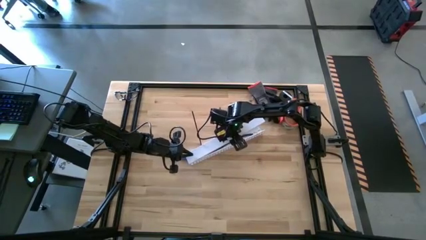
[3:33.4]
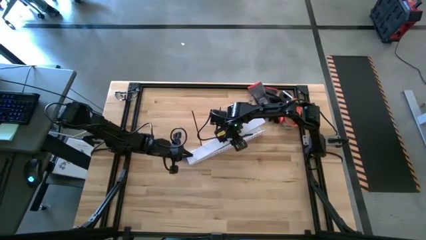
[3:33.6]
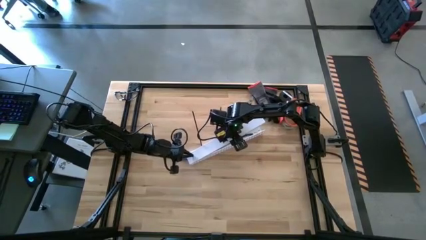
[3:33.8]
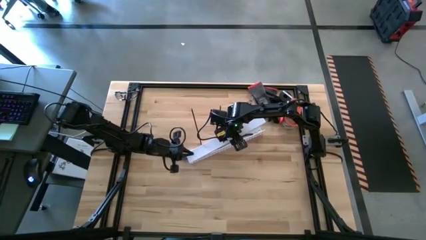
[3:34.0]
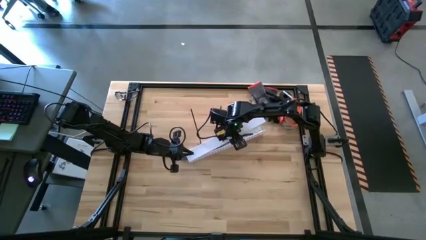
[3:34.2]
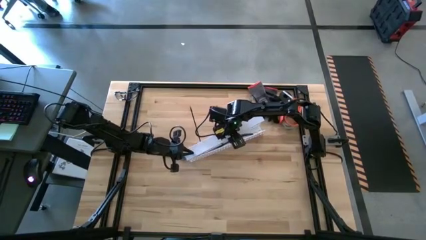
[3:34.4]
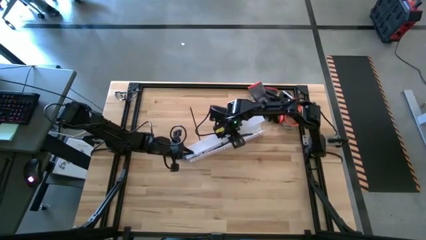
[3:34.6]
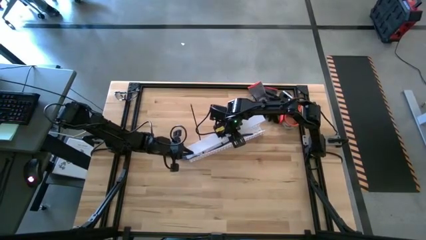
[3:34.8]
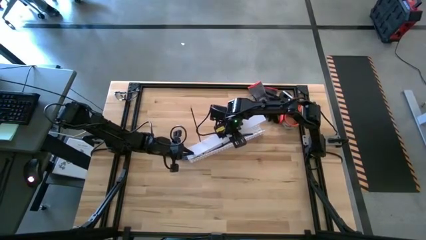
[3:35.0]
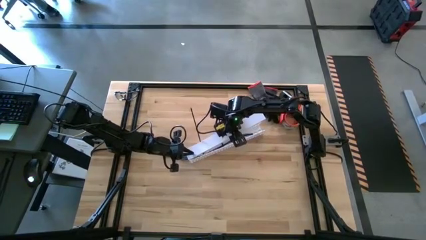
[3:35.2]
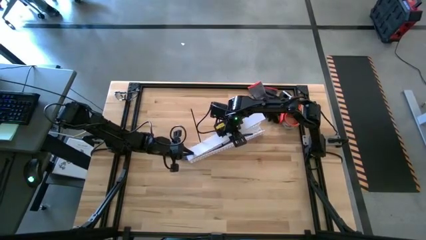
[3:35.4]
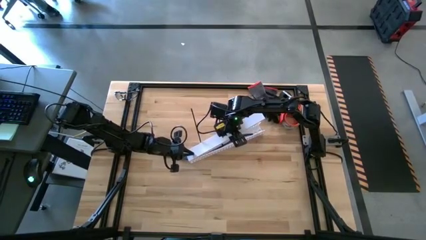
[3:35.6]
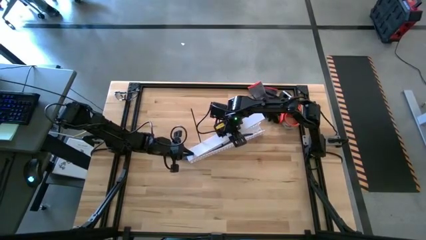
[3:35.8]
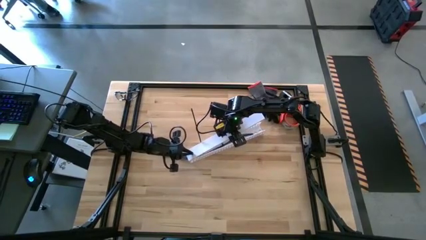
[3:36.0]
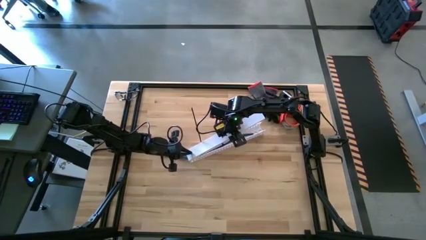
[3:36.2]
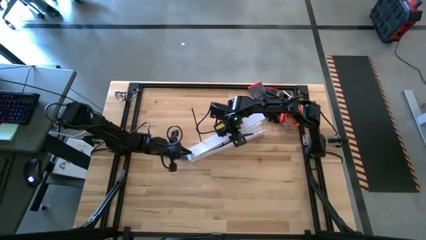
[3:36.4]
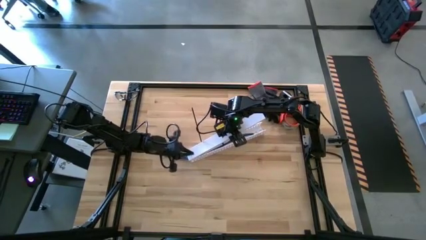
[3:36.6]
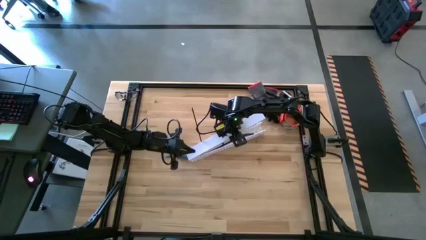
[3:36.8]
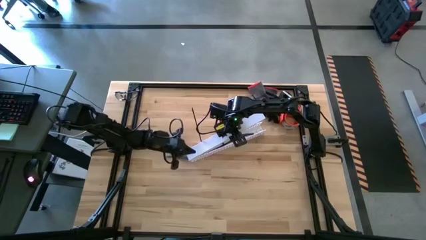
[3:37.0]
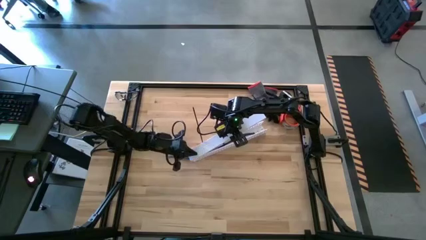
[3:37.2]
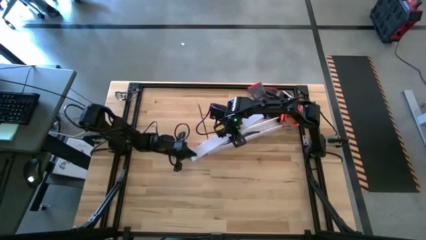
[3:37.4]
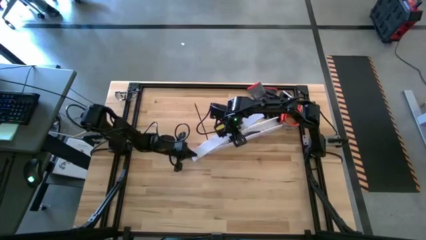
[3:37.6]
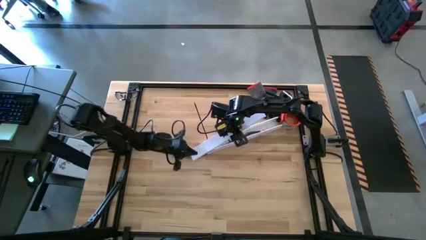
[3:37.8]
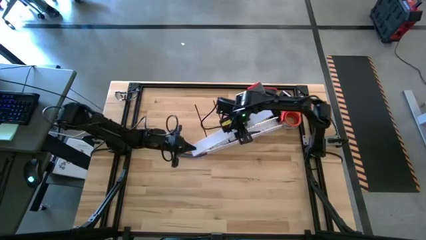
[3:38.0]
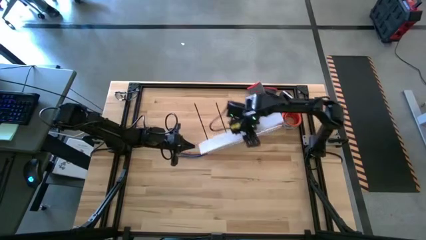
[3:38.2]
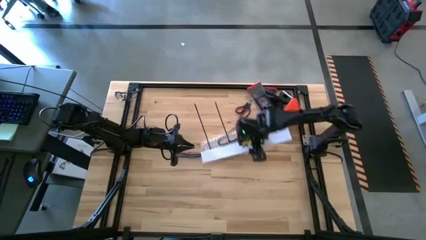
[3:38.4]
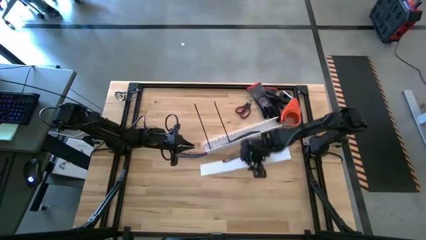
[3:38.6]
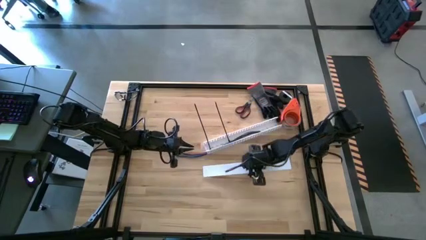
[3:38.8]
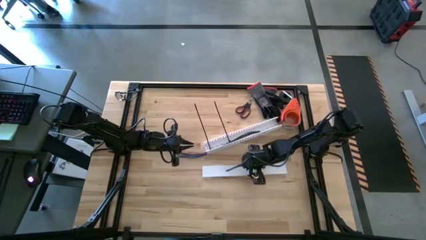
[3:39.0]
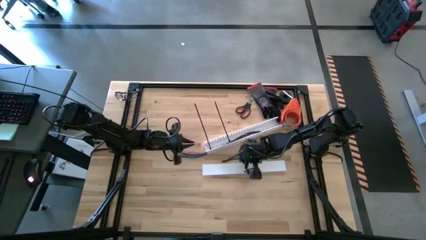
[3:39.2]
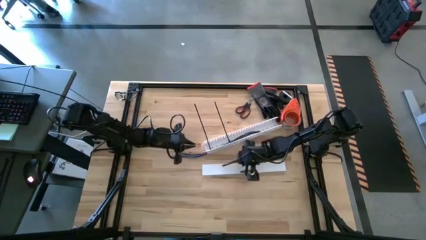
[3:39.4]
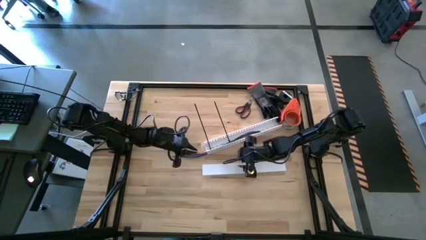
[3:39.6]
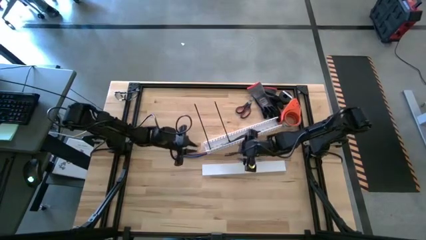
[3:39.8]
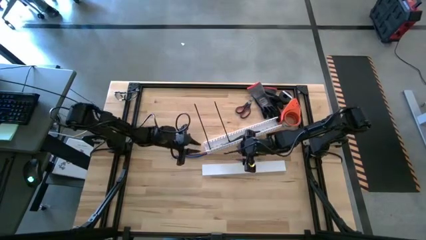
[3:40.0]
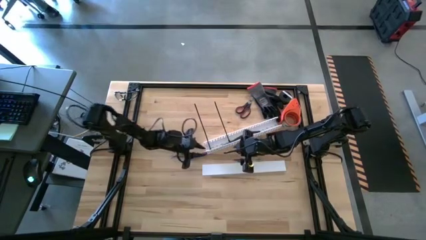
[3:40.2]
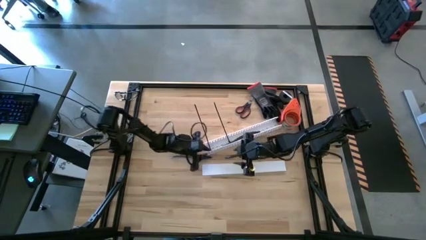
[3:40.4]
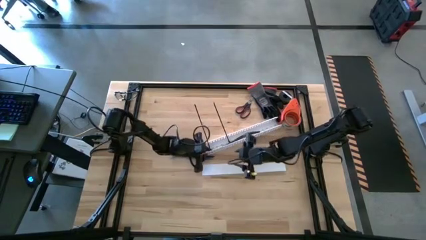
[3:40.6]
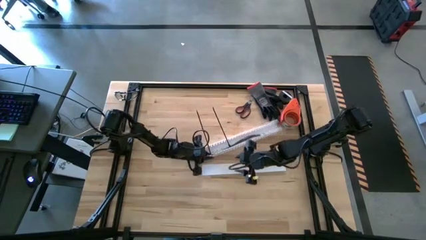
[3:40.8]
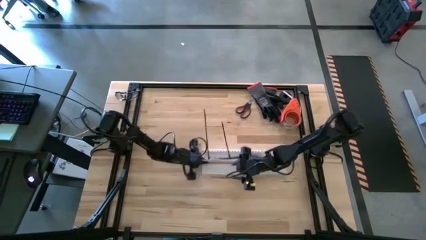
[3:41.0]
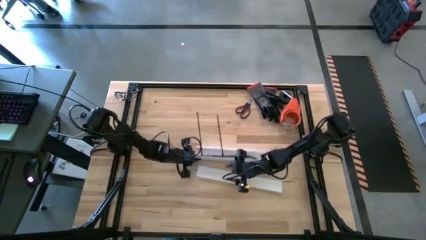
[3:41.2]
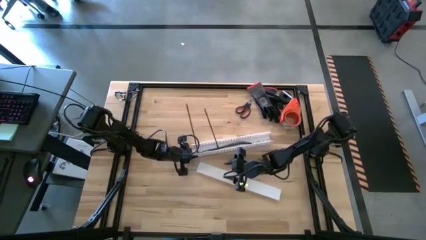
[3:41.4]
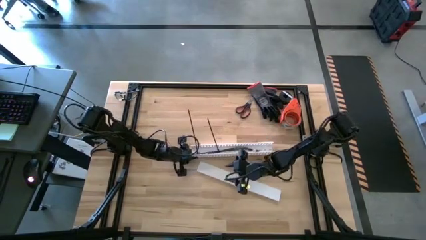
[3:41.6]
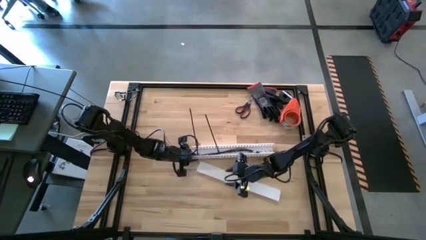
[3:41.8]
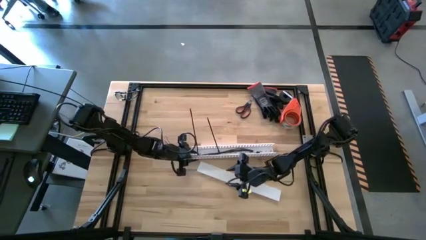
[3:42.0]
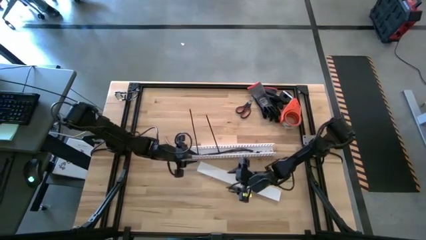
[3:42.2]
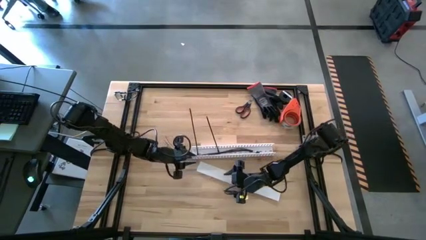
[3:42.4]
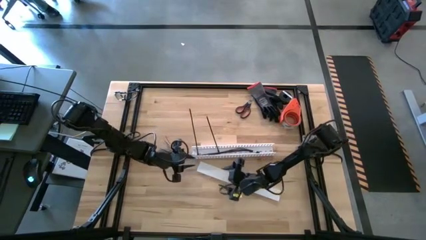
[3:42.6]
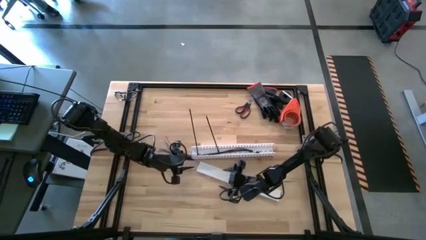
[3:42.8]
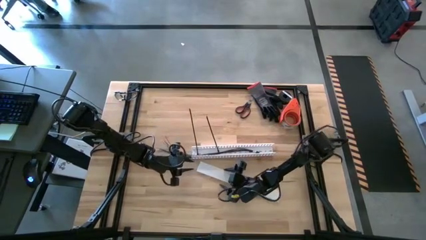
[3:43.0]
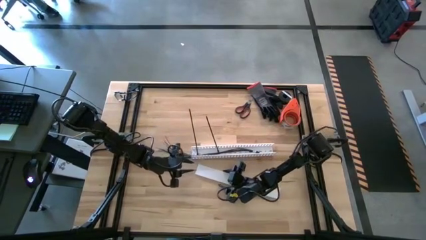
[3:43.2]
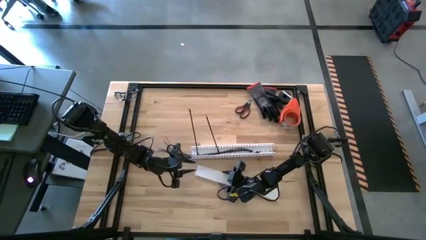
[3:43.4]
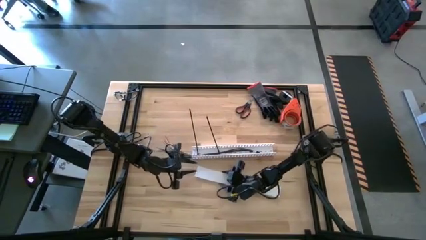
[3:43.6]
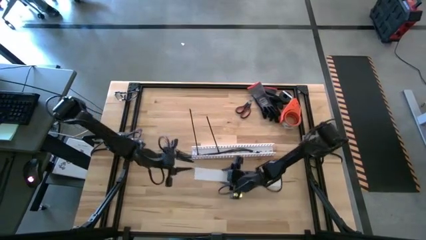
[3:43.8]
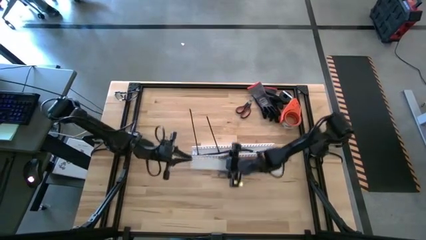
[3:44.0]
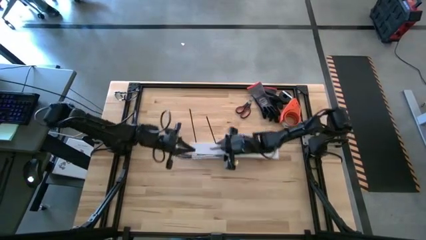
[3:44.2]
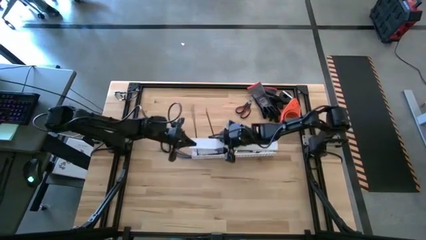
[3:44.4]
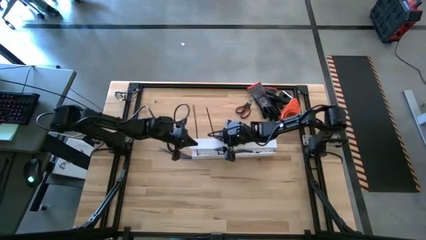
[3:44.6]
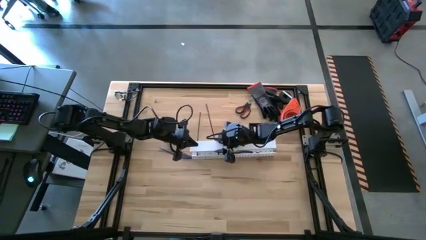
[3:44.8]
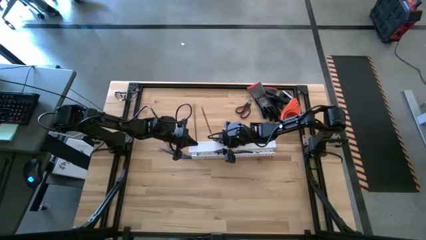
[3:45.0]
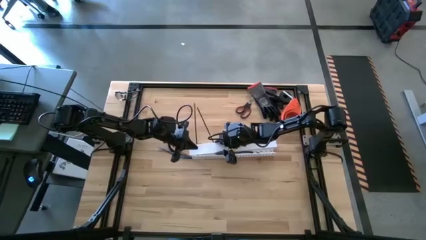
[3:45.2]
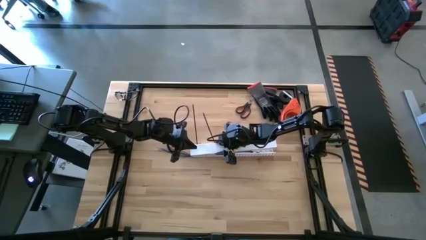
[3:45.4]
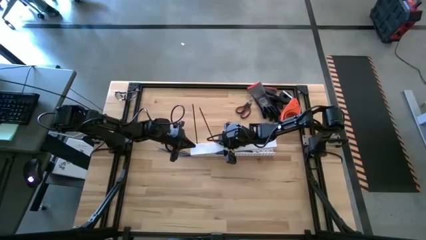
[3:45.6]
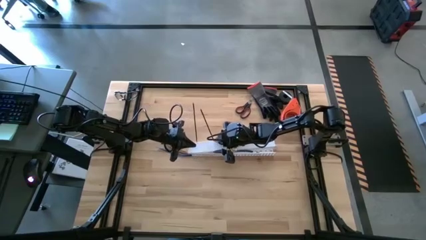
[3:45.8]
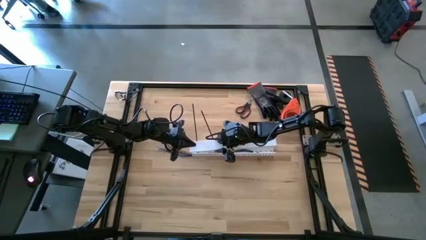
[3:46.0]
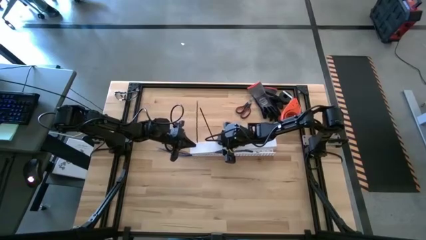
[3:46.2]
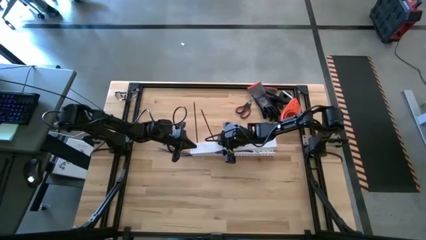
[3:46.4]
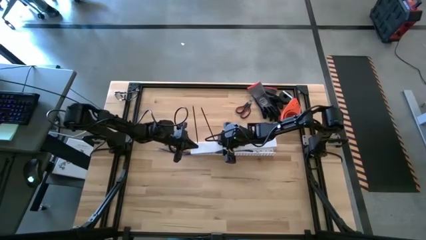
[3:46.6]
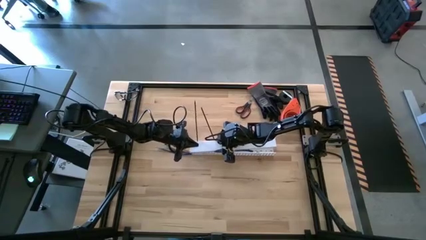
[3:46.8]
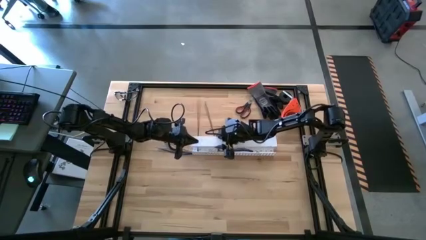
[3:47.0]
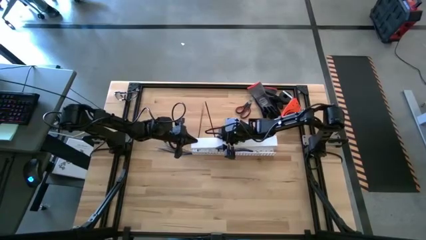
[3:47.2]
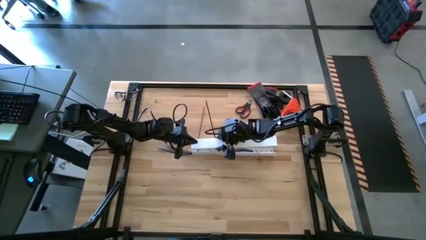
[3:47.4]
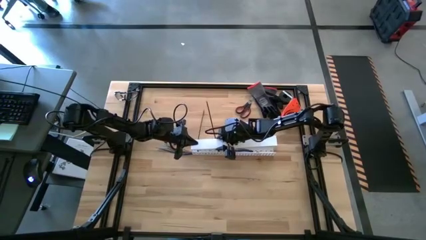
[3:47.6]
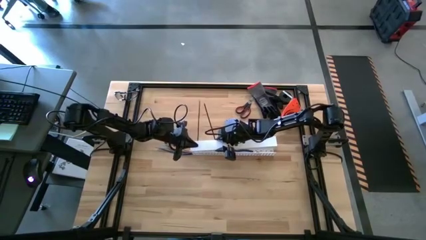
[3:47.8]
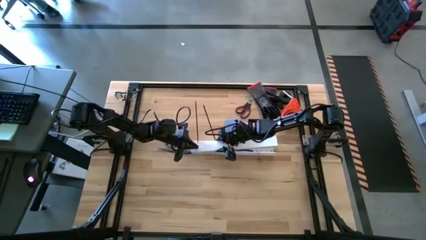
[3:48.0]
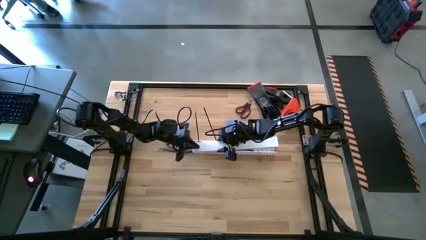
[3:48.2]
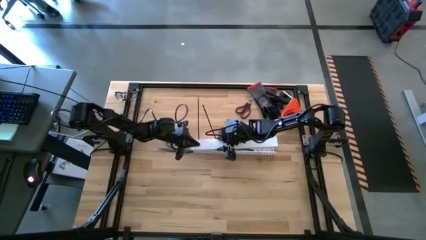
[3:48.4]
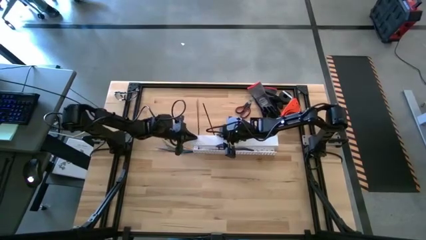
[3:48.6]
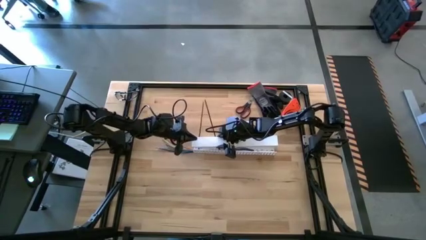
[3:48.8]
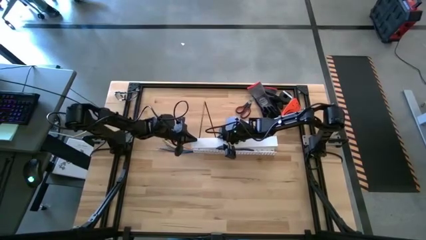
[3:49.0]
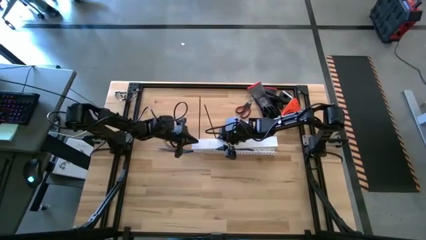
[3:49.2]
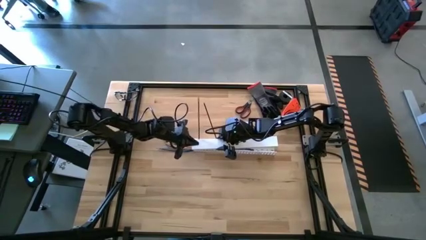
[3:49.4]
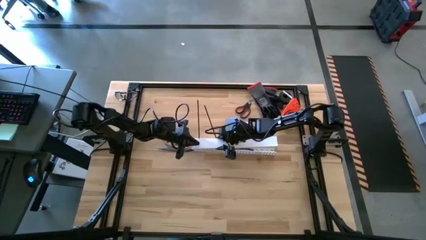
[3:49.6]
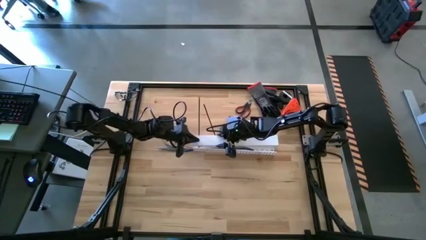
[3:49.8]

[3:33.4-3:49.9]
Task: Ziptie cables
Close the white cable duct
